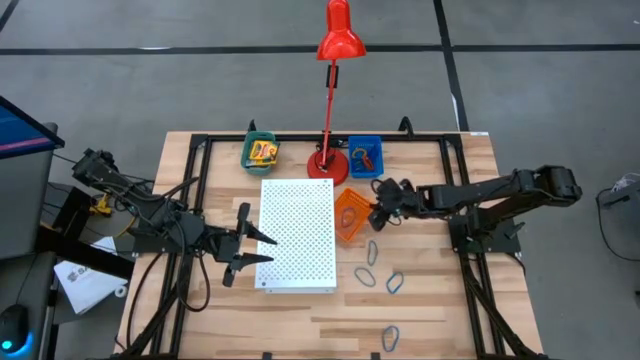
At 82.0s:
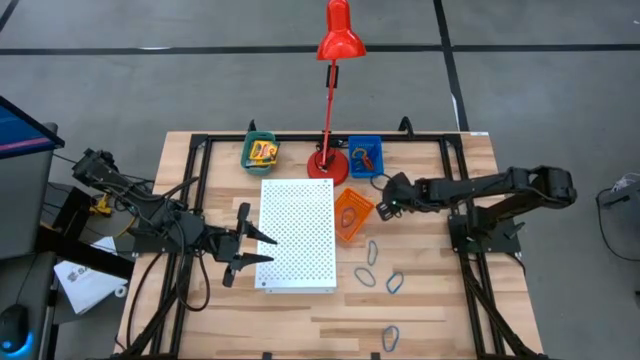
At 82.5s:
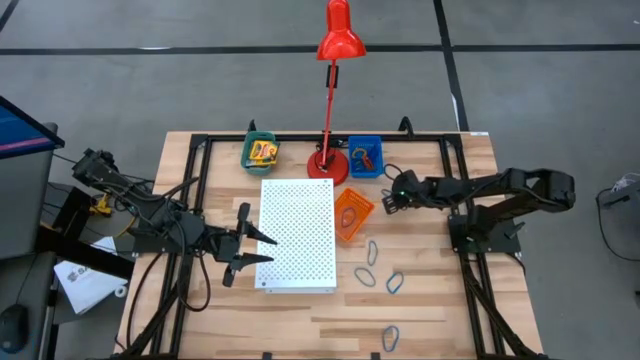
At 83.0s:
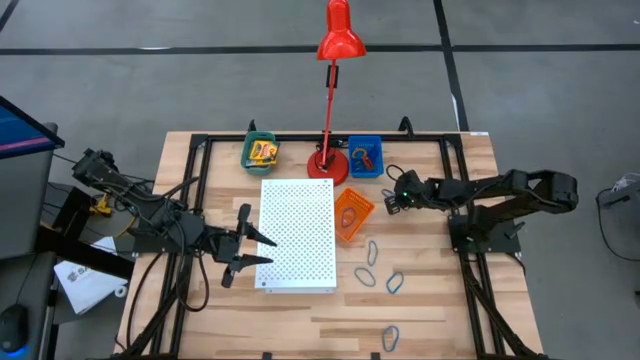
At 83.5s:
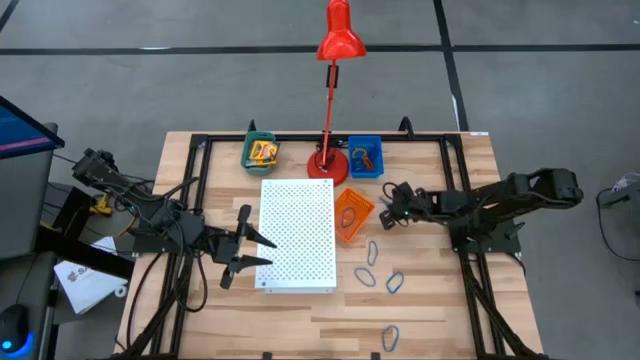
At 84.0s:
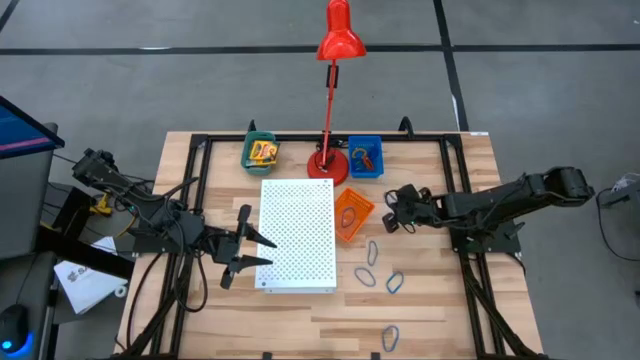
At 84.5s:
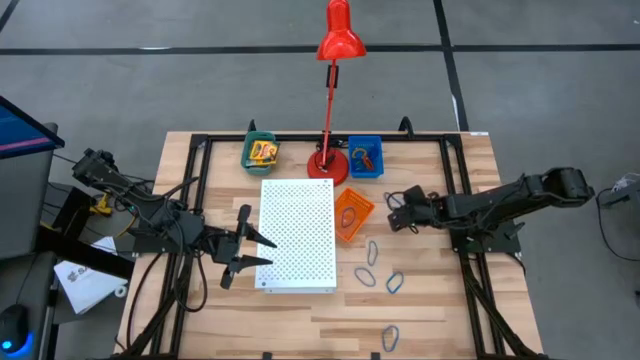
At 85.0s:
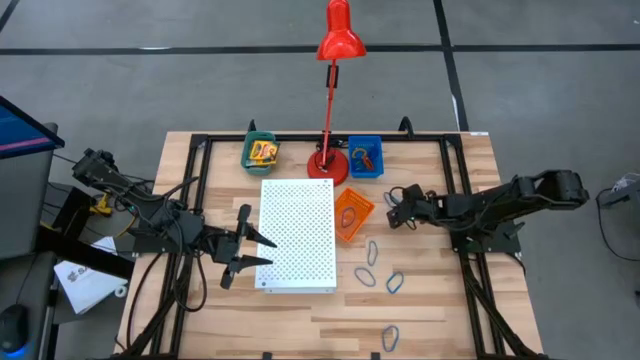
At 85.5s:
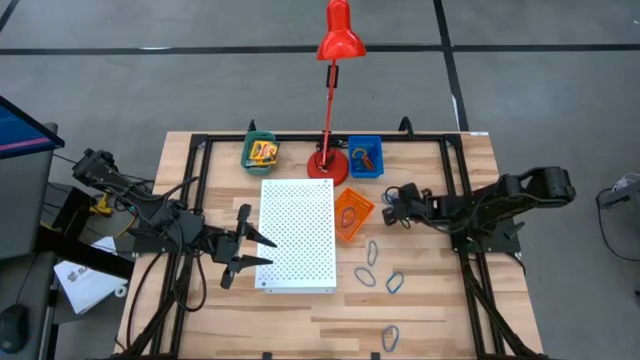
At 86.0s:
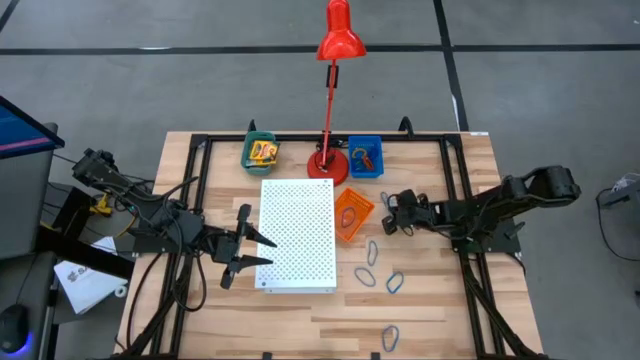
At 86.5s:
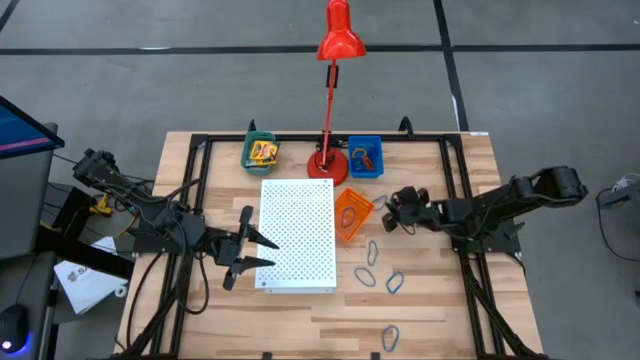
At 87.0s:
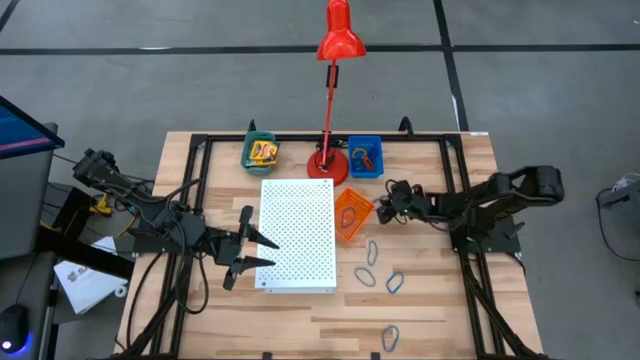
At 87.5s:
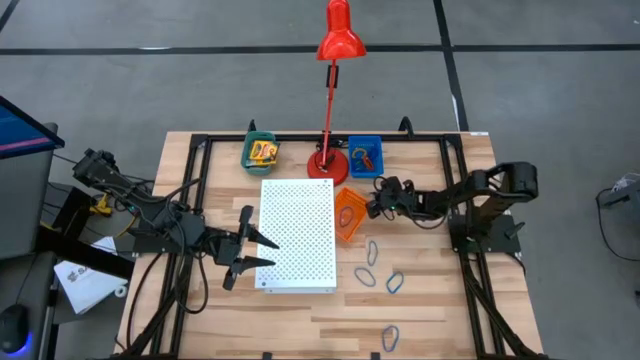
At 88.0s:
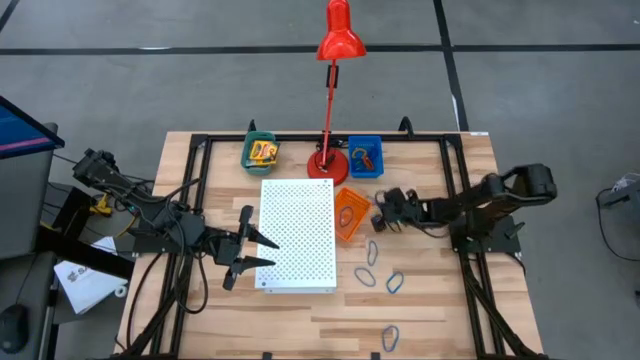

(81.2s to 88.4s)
Task: Pick & Place Office Desk Supplies
Put the blue rubber band into the orange bin

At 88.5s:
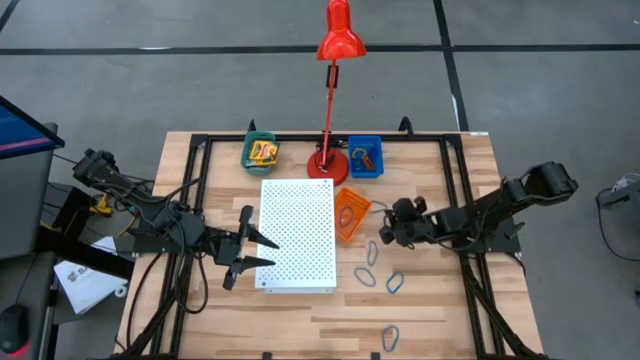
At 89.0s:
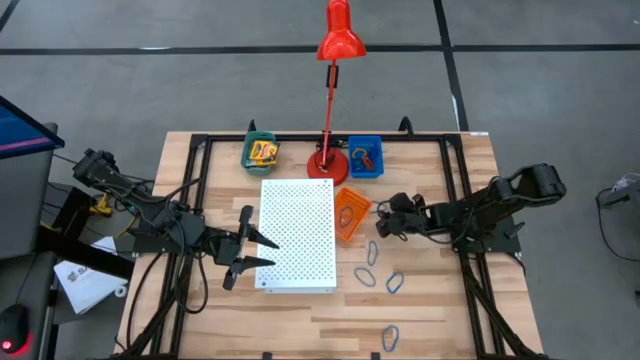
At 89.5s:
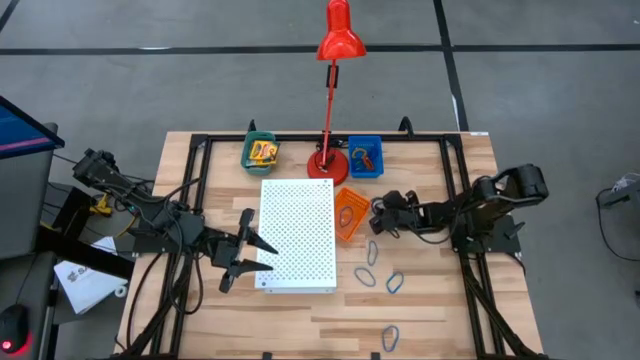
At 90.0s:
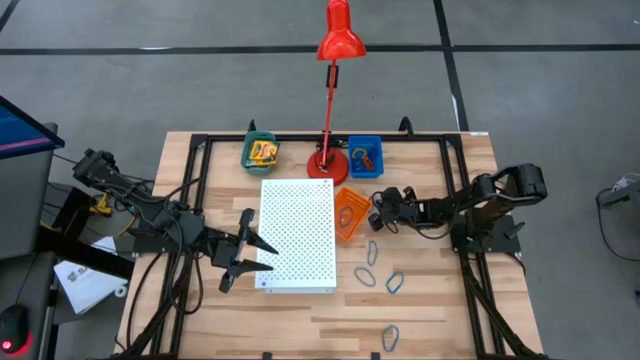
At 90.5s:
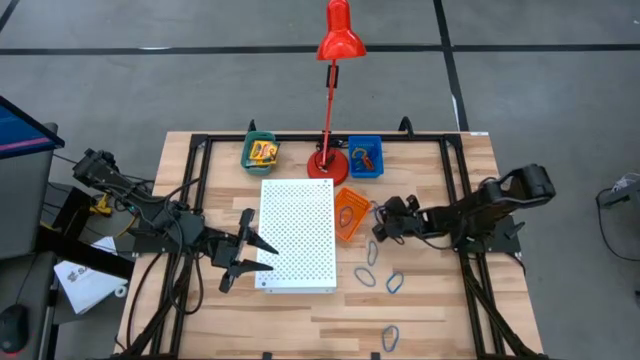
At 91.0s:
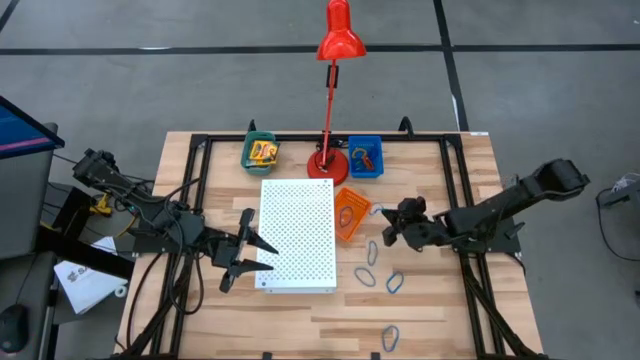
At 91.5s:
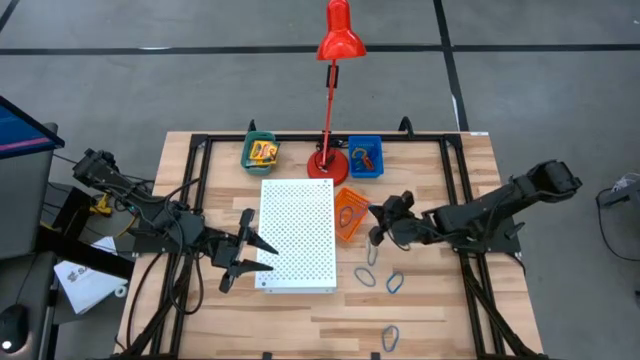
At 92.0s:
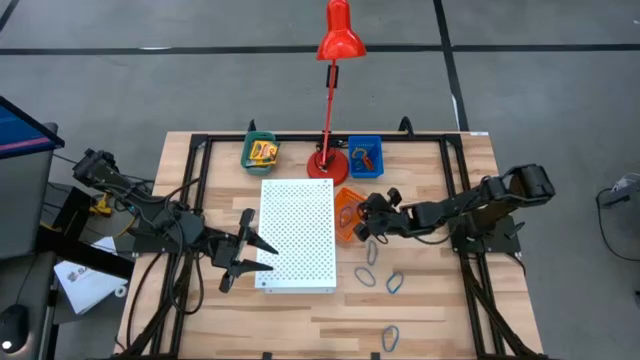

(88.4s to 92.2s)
Put the blue rubber band into the orange bin

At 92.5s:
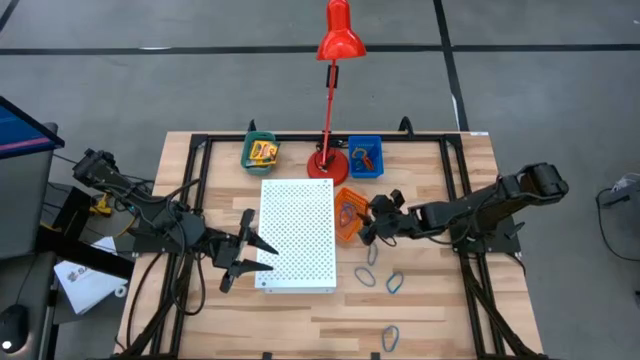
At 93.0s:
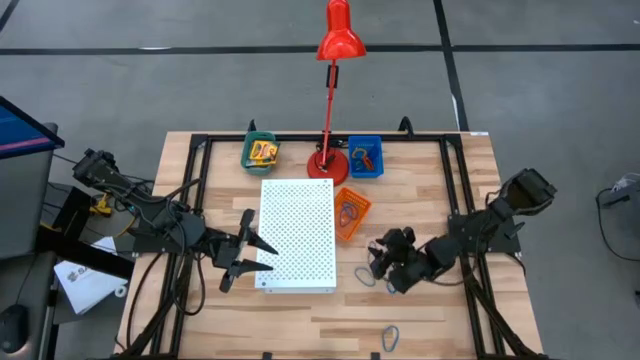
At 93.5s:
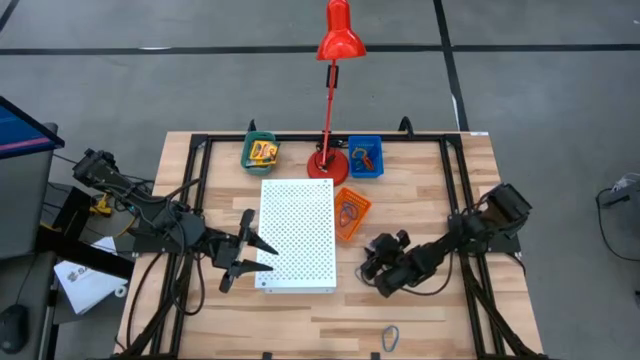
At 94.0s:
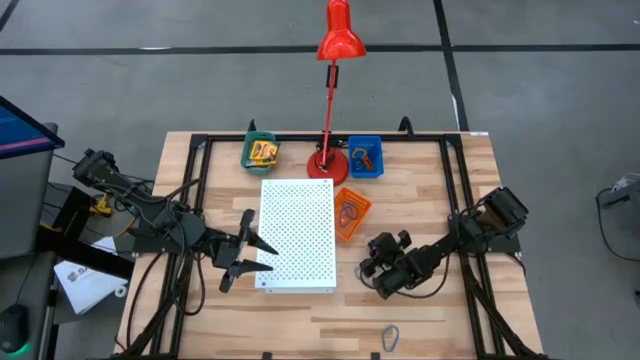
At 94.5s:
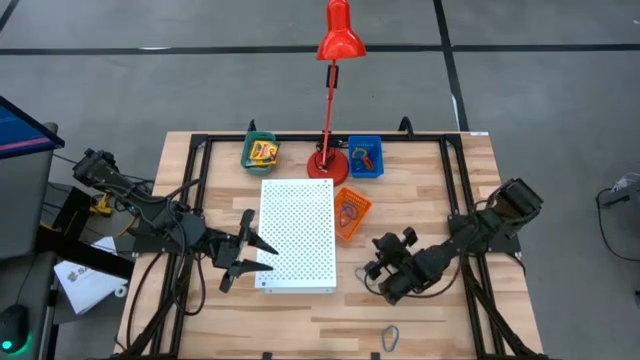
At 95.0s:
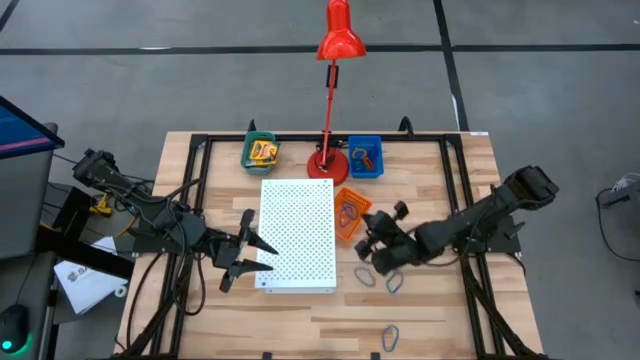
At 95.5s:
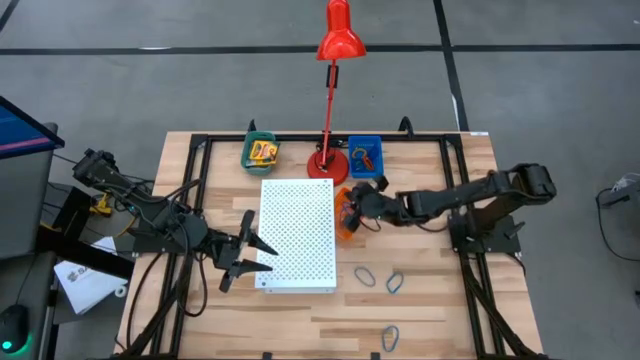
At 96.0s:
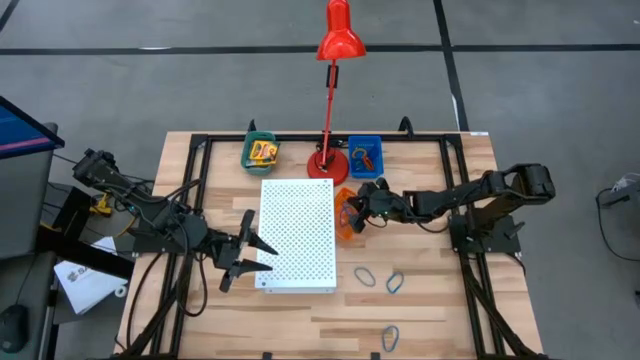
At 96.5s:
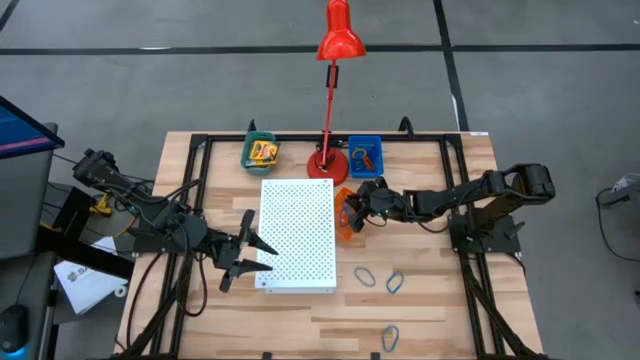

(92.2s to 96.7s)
Put the blue rubber band into the orange bin

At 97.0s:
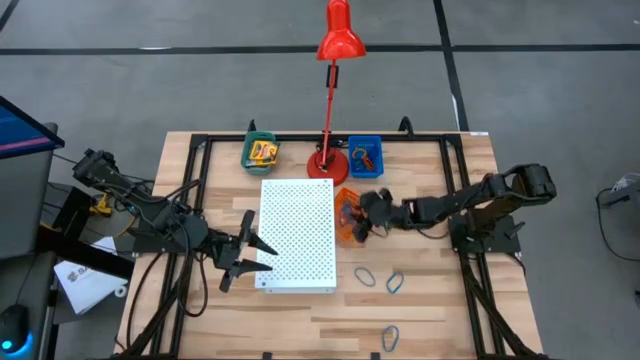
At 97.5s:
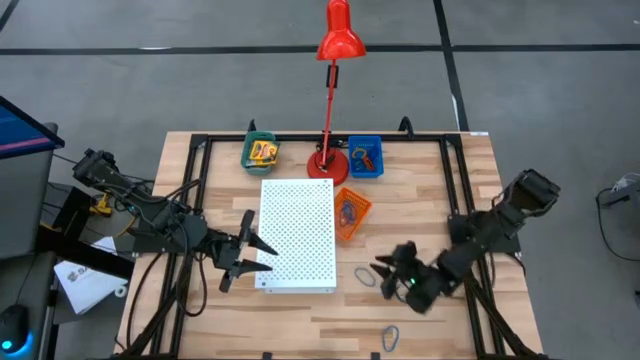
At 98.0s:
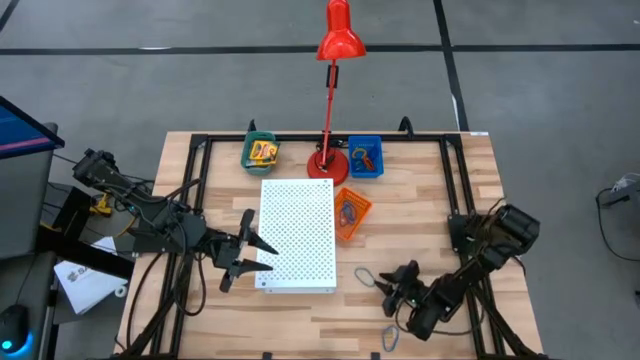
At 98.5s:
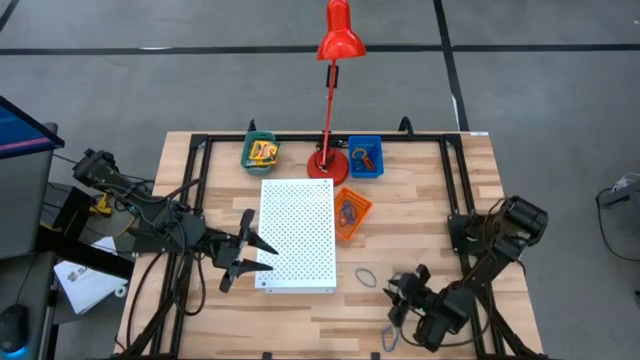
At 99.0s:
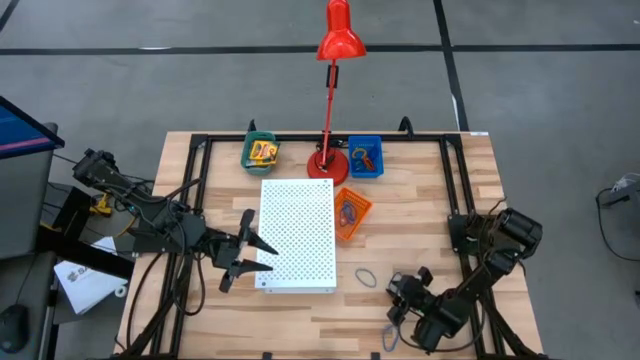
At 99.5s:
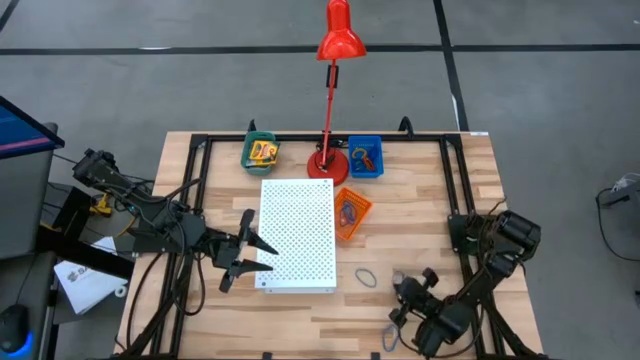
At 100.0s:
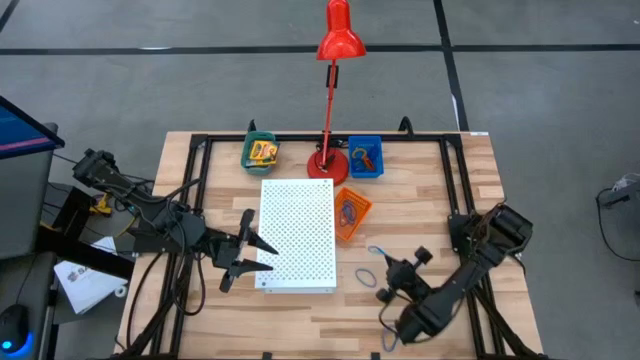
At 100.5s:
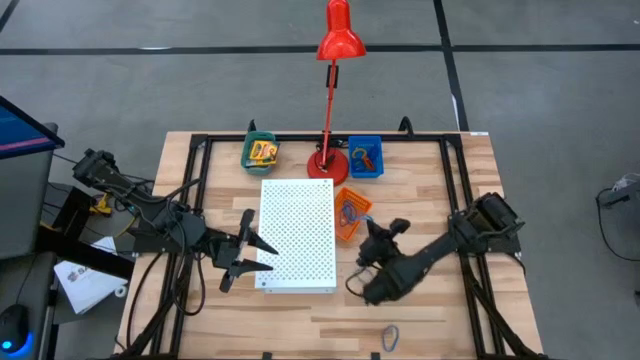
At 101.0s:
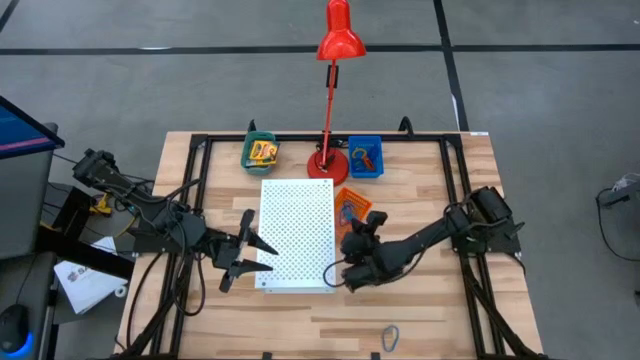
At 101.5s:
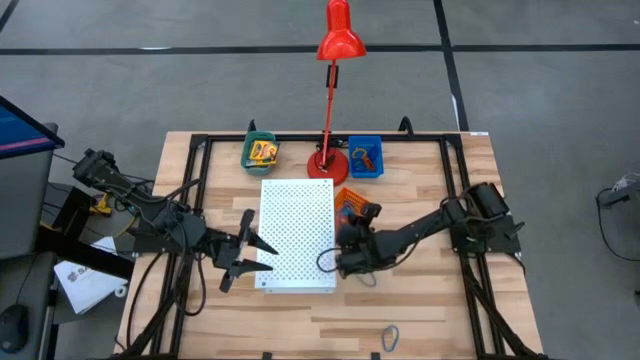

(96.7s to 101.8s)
Put the blue rubber band into the orange bin

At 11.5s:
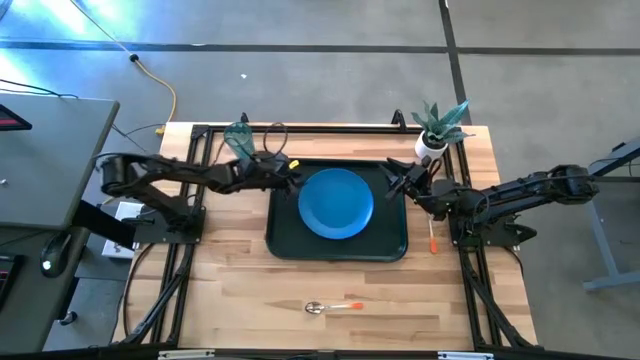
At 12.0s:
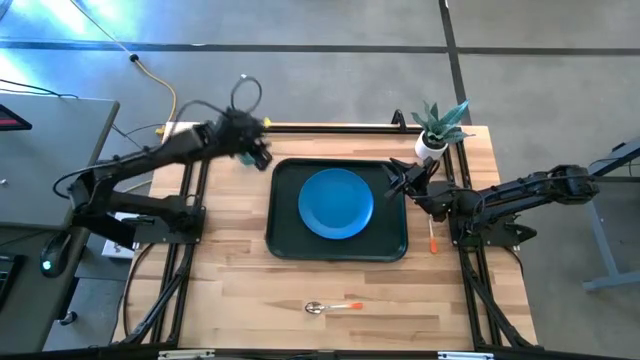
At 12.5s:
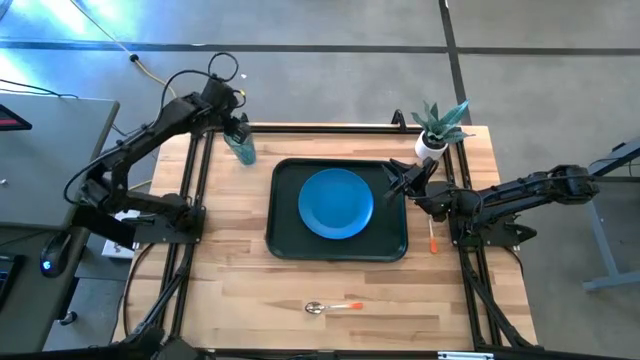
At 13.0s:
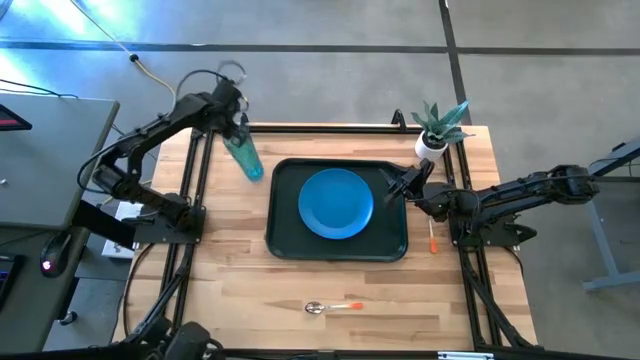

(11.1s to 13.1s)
Task: Pick and place plate/cup/fork/spoon on tray
Put the blue cup on the dark green tray
